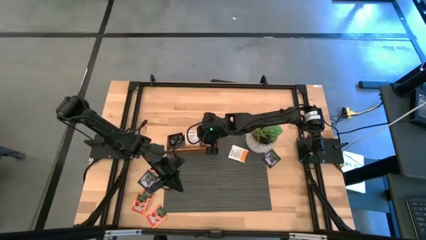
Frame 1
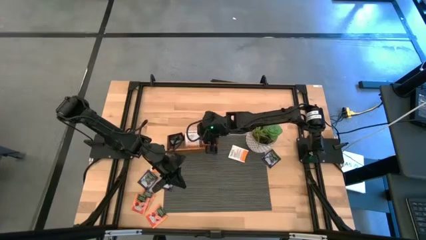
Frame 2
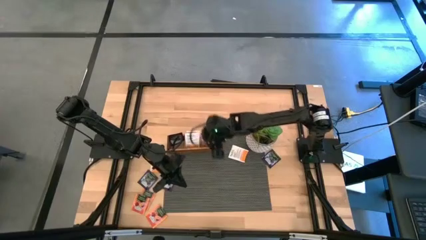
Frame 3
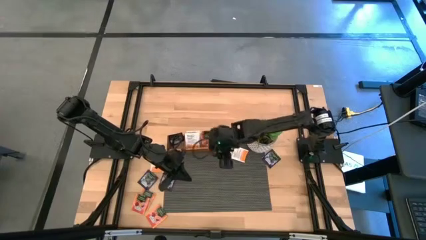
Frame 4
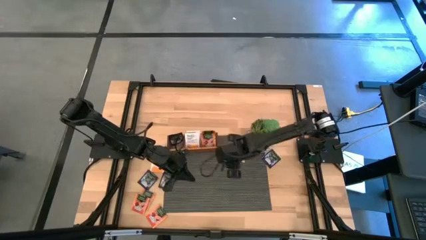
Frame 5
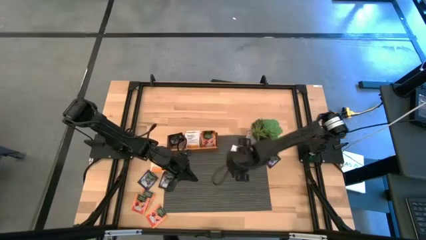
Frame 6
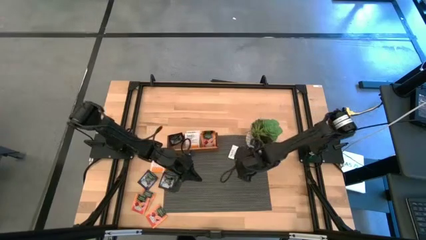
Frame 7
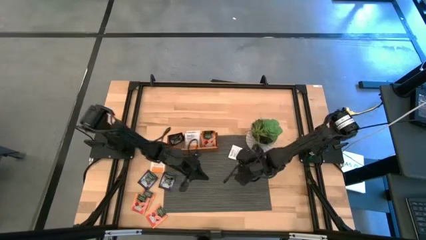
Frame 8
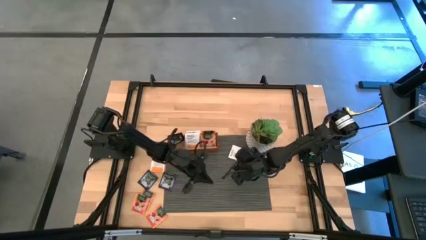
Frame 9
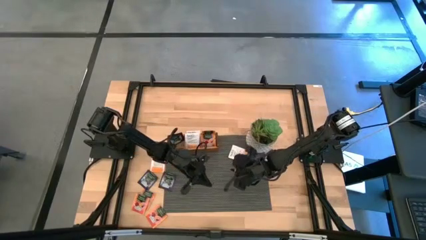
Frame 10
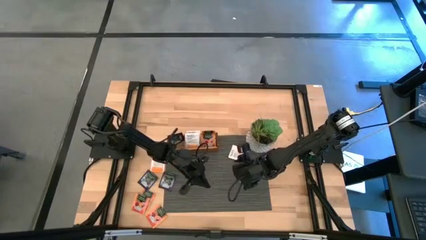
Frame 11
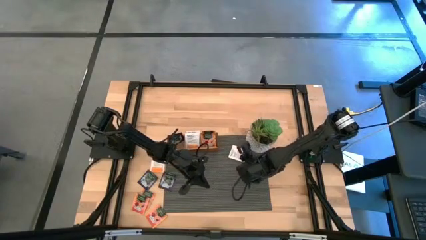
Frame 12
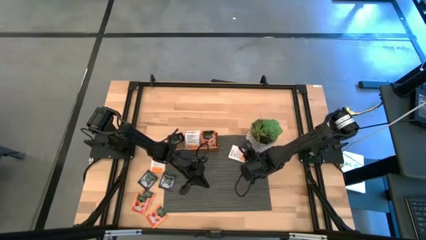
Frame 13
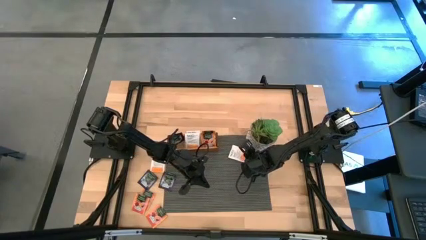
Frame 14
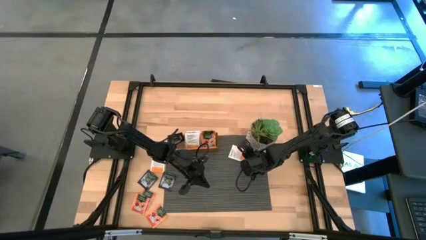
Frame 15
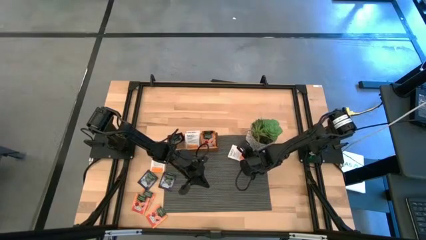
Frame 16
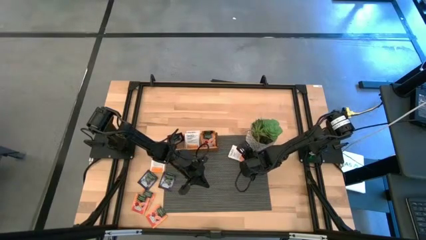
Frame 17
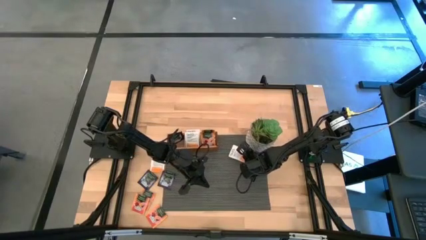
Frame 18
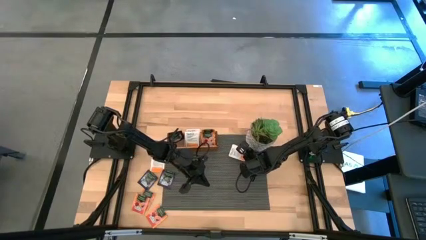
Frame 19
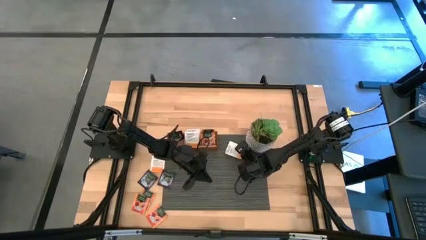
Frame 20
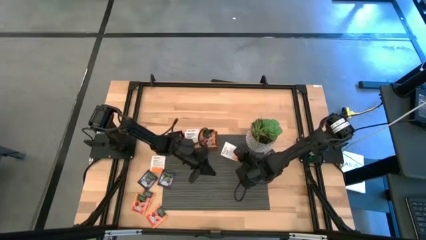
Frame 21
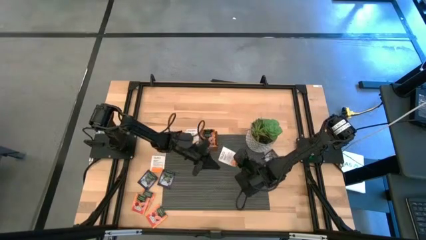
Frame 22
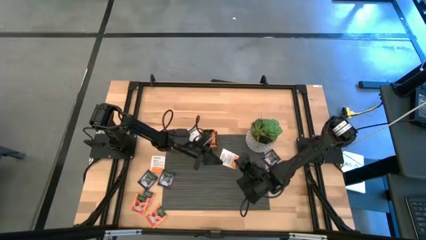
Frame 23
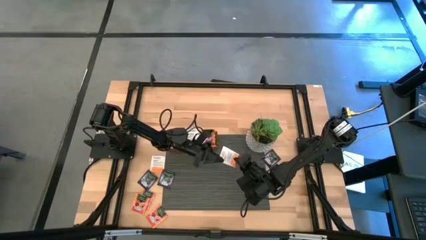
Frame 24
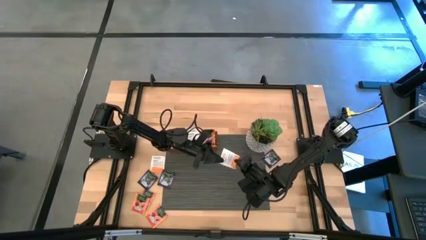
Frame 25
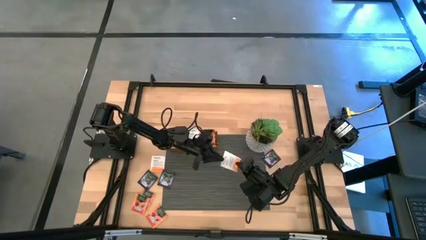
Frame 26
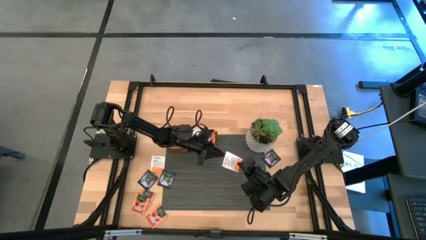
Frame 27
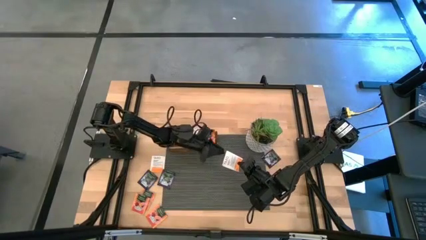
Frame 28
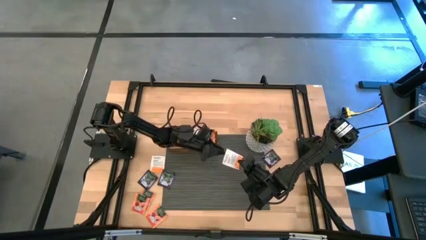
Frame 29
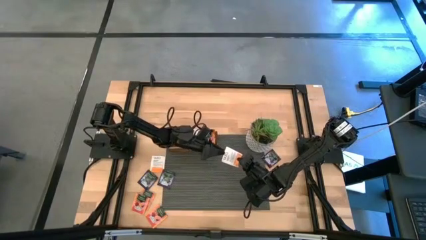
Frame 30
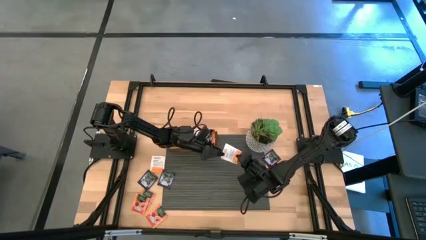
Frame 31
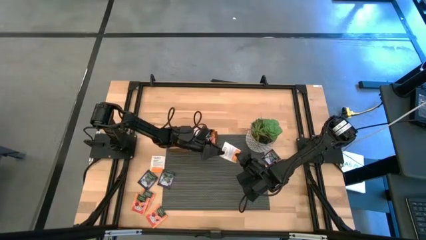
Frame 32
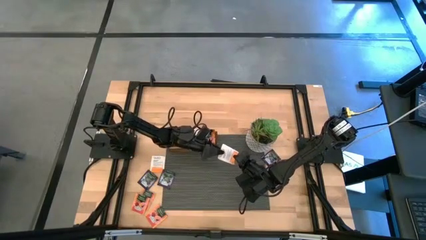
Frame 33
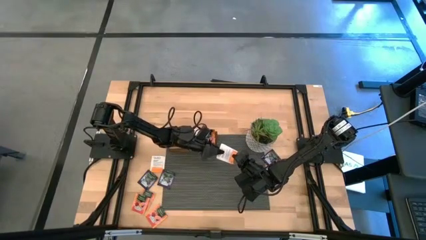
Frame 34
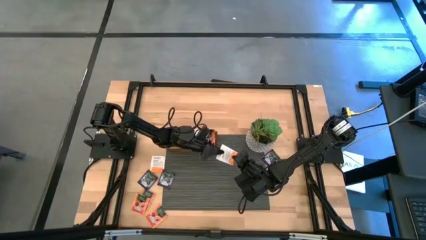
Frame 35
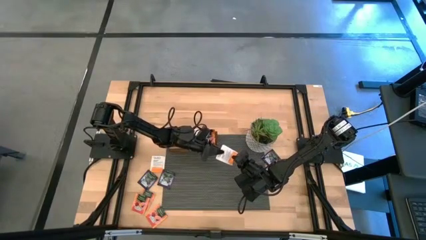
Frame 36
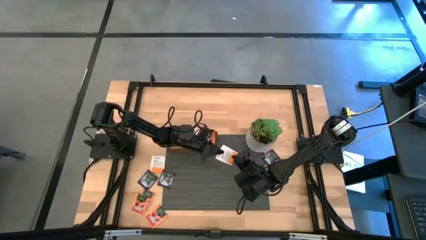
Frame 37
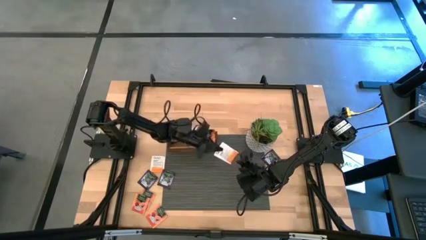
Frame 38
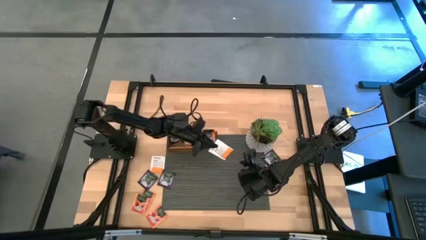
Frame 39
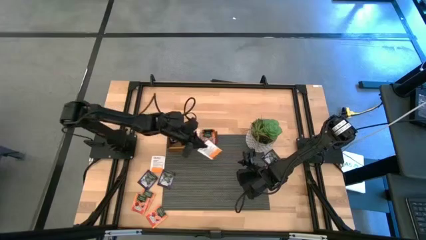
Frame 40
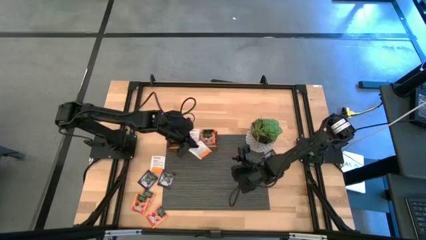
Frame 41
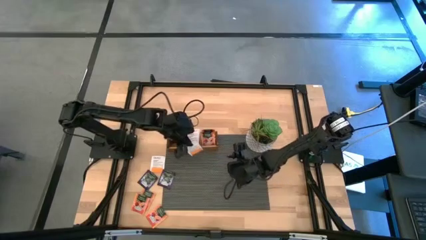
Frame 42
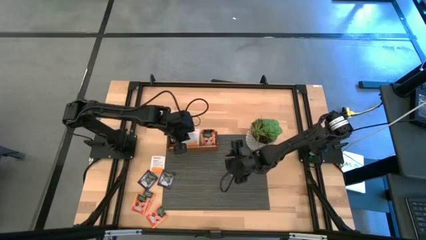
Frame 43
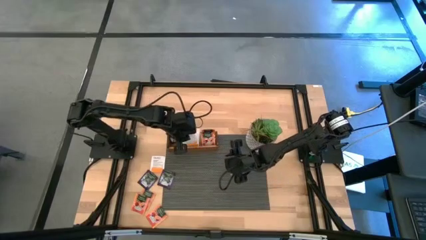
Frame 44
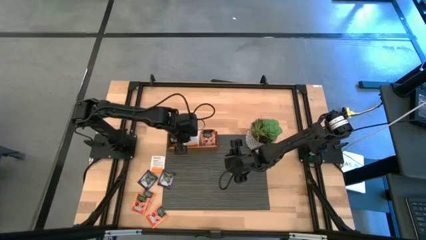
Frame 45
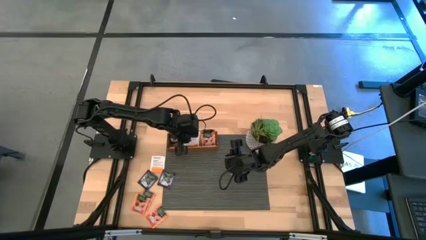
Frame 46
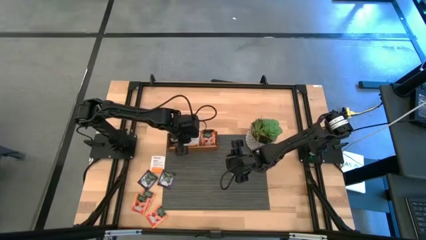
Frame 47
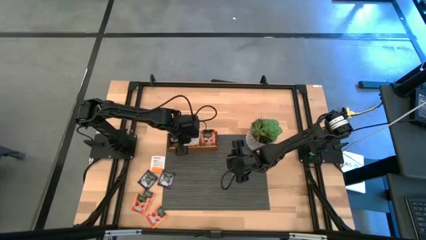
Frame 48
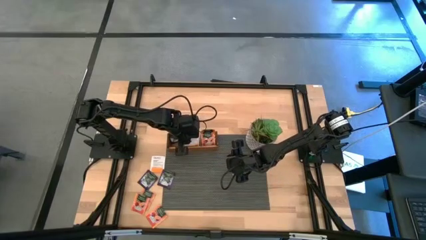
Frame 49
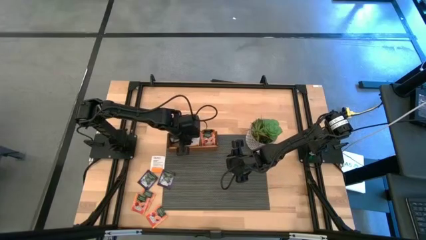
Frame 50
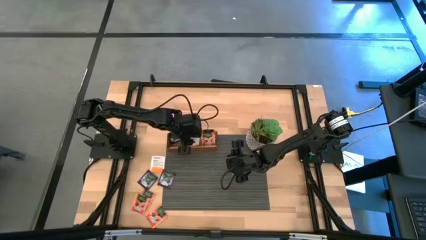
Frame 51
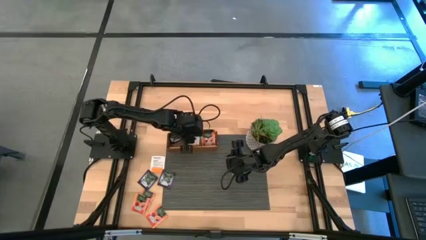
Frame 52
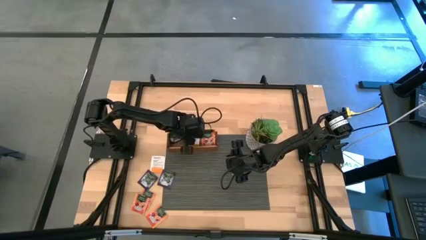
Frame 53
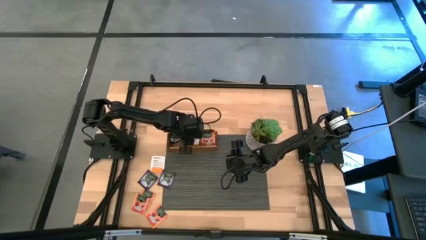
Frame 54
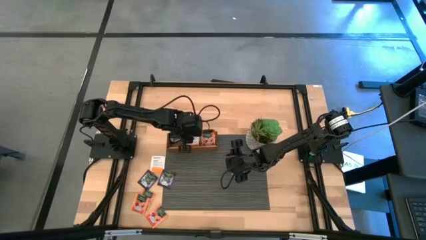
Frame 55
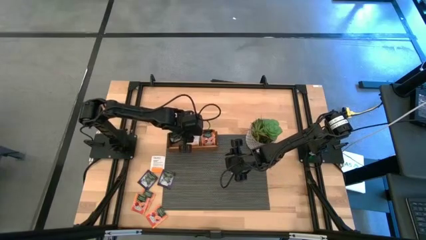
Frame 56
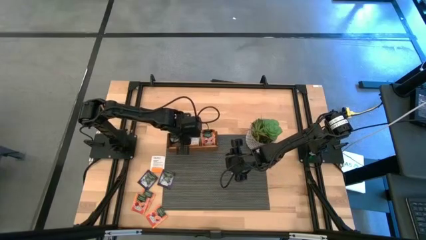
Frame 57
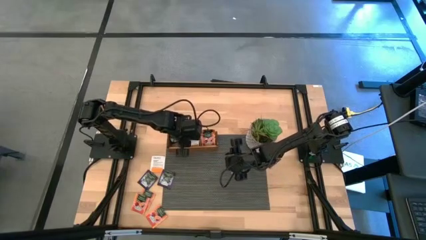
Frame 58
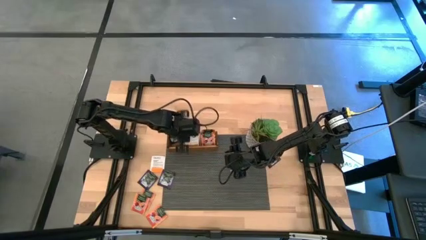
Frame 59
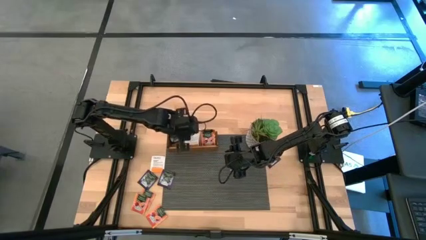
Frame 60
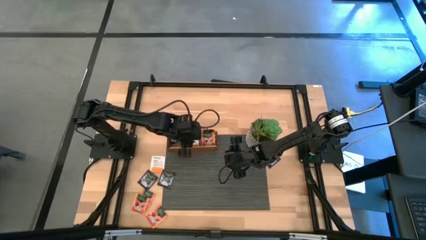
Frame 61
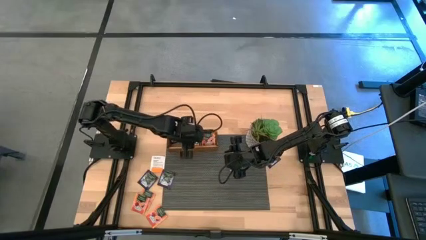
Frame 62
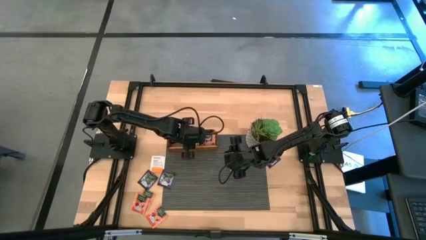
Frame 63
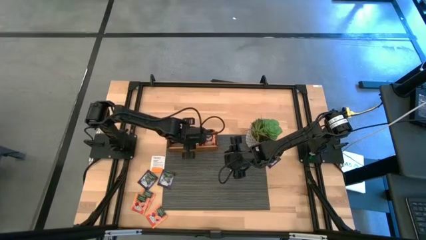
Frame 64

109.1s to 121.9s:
Task: Pick & Place Tea
Put the white tea bag to the middle section of the wooden organizer

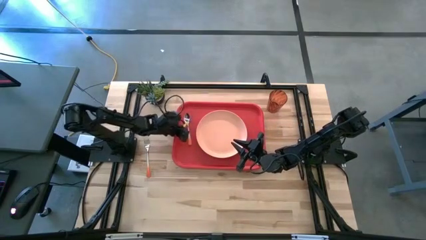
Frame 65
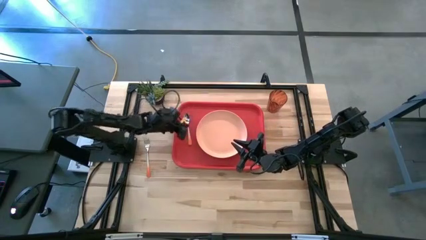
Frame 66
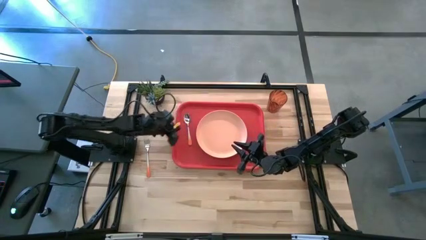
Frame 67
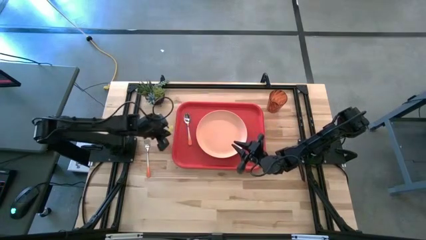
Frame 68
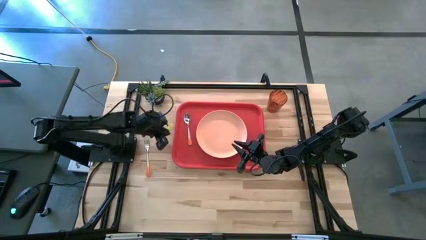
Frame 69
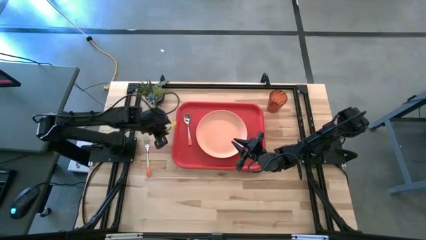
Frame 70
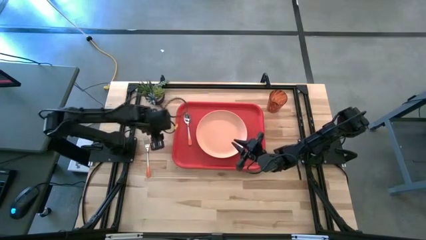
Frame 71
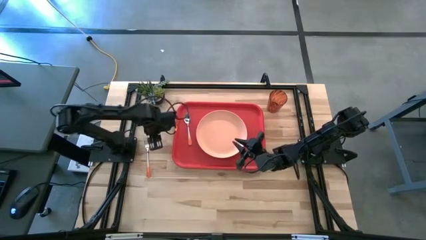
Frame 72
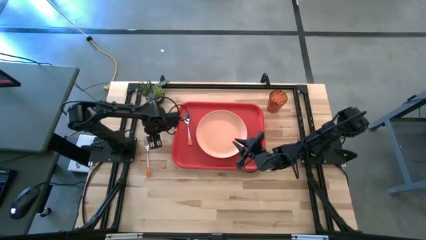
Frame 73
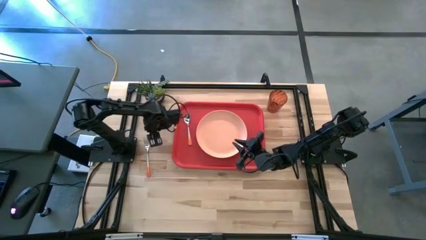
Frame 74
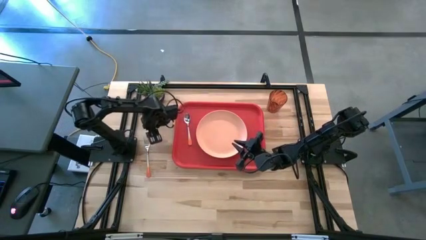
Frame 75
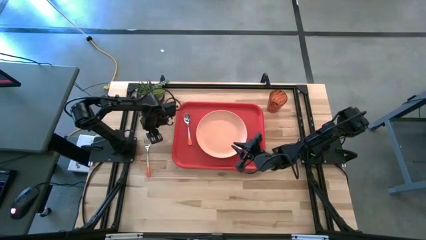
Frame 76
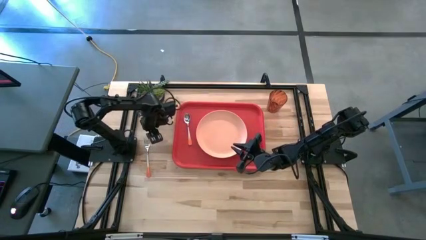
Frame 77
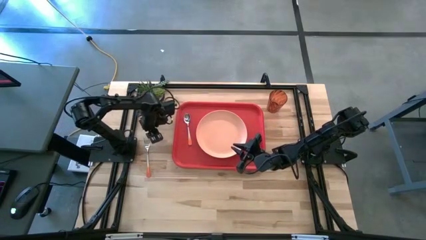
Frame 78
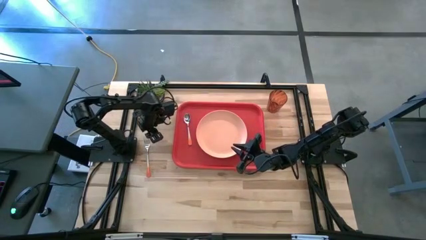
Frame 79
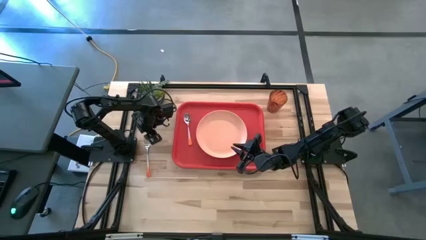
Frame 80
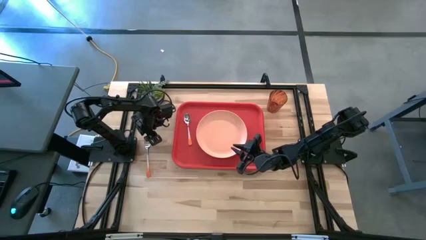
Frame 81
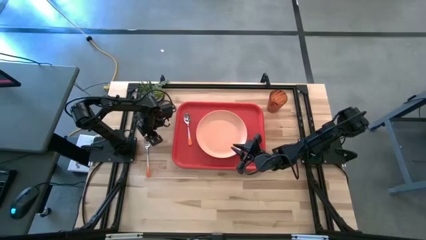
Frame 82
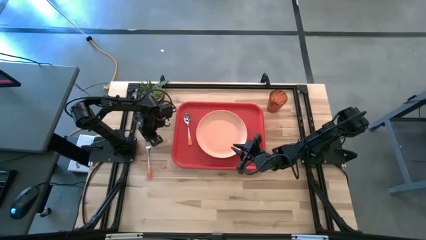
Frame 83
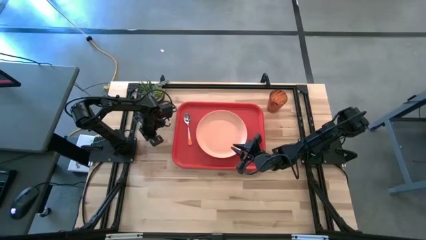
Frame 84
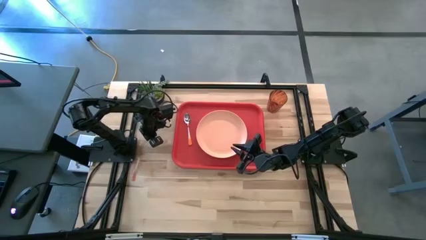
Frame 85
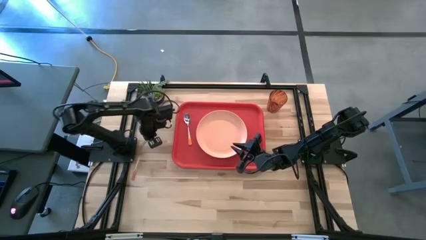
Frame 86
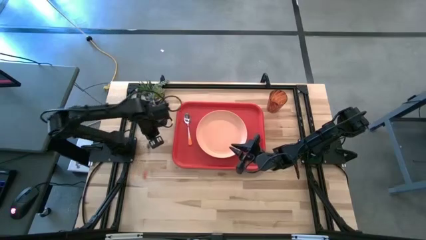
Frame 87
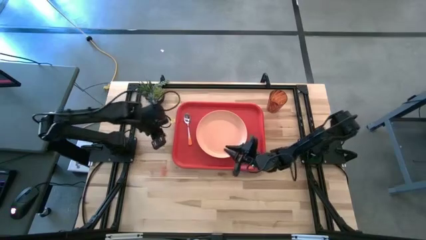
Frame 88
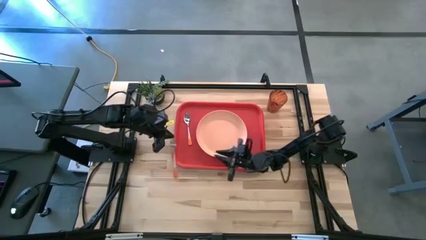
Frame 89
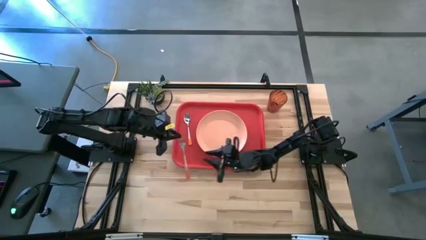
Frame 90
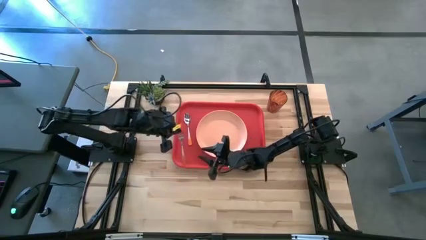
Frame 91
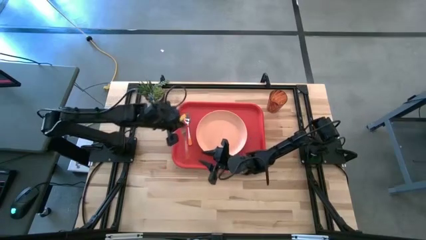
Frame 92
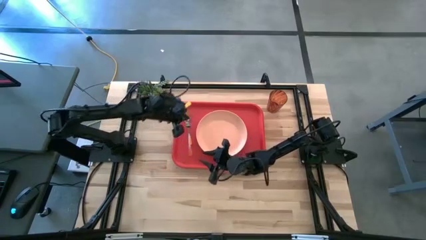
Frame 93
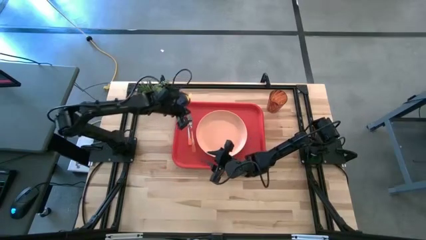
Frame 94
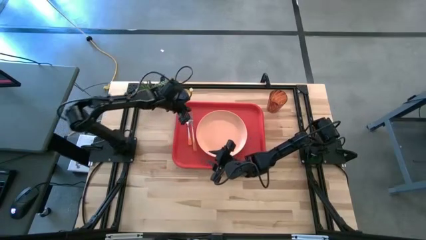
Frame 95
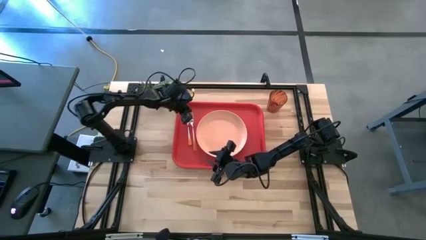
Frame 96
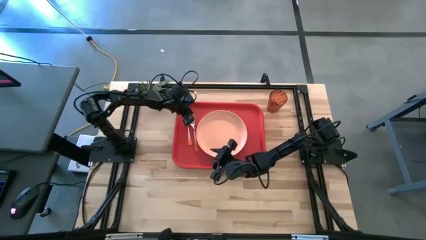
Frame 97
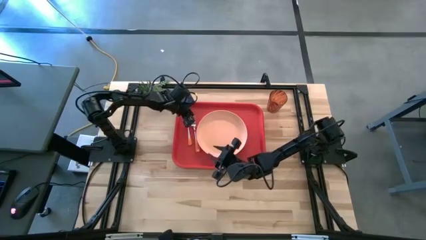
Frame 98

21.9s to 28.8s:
Task: Pick and place plate/cup/fork/spoon on tray
Put the orange fork on the red serving tray
